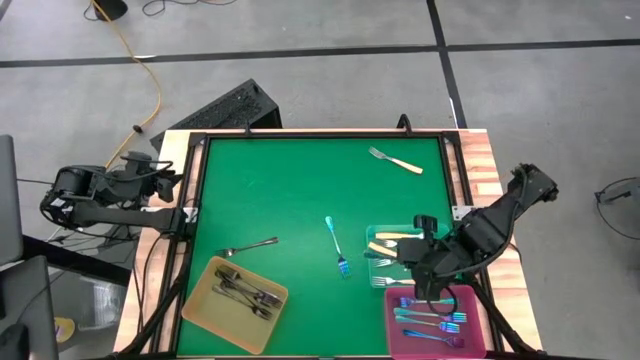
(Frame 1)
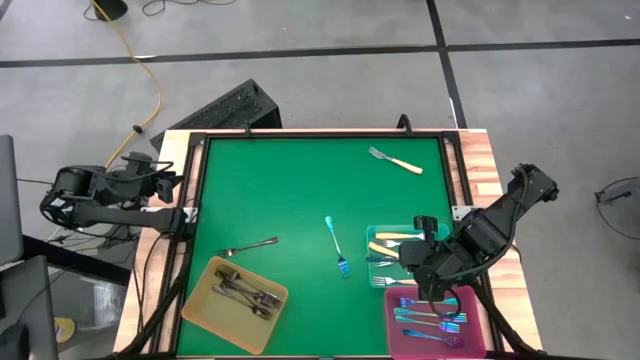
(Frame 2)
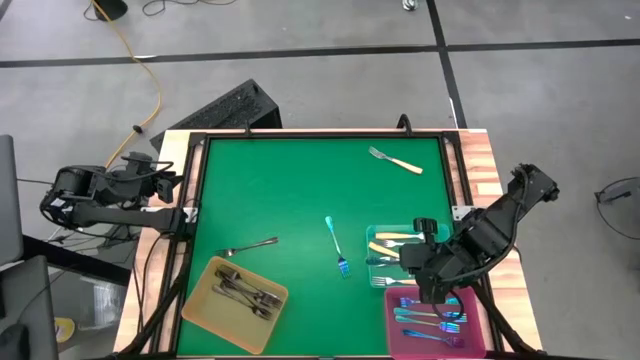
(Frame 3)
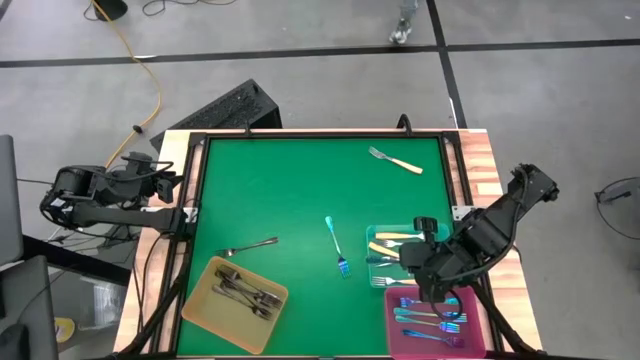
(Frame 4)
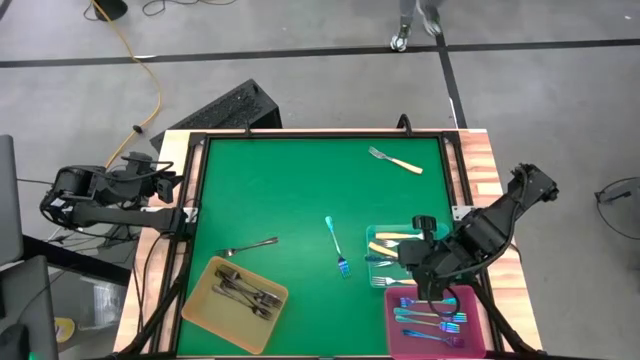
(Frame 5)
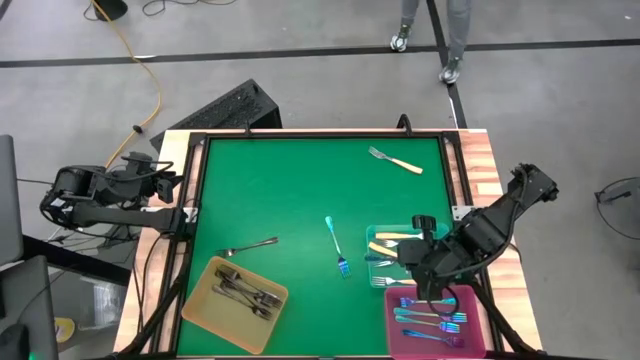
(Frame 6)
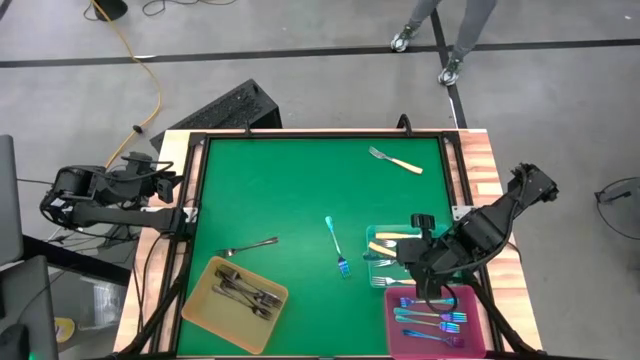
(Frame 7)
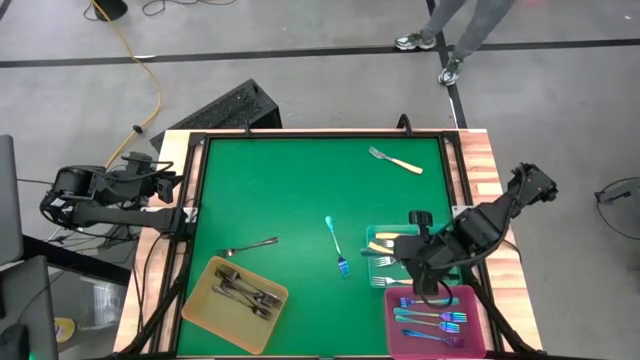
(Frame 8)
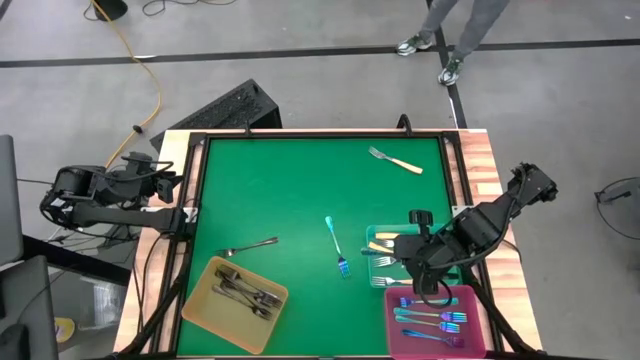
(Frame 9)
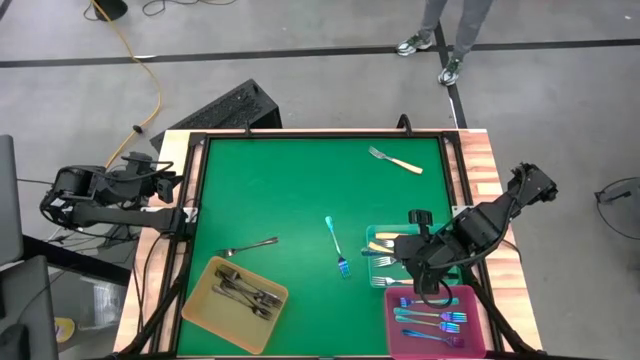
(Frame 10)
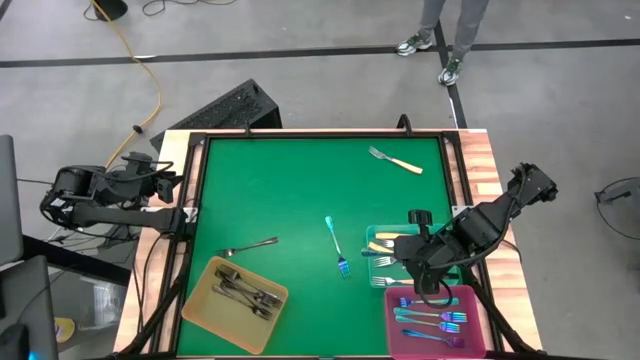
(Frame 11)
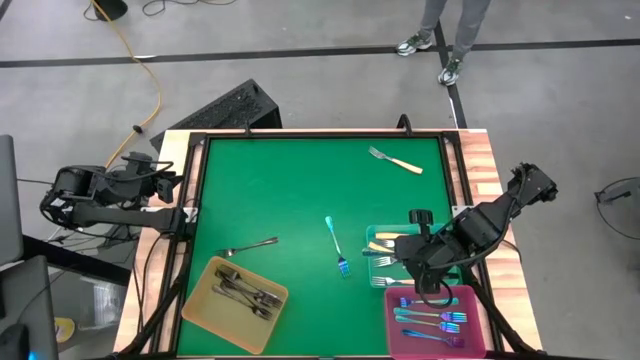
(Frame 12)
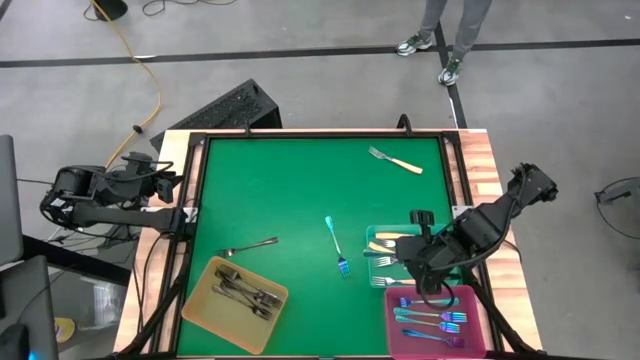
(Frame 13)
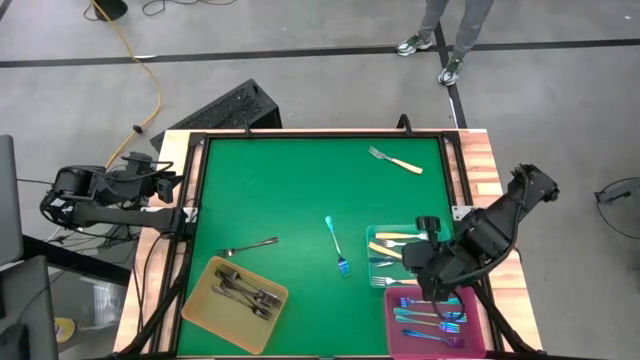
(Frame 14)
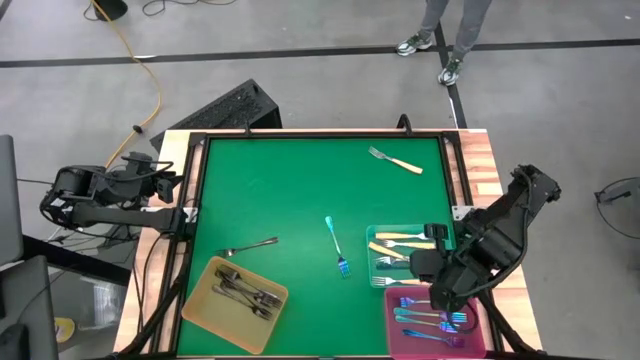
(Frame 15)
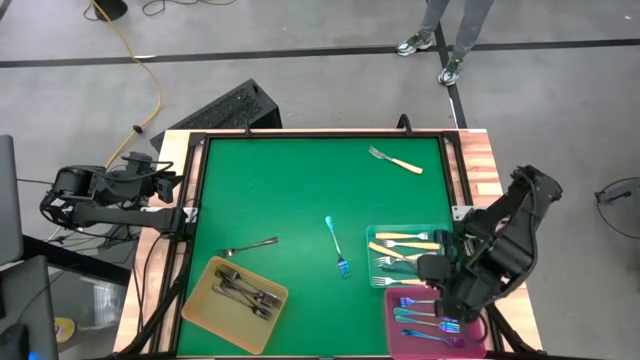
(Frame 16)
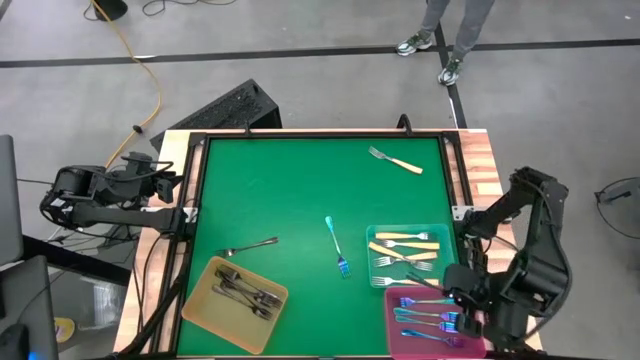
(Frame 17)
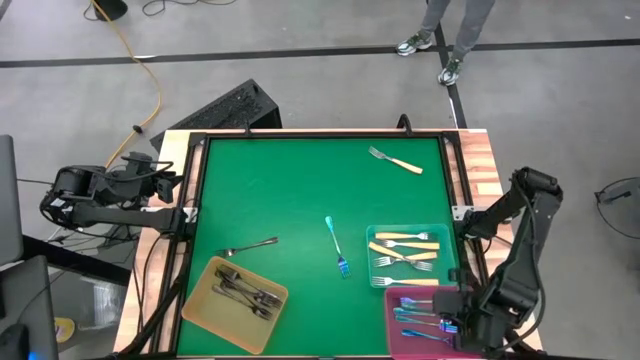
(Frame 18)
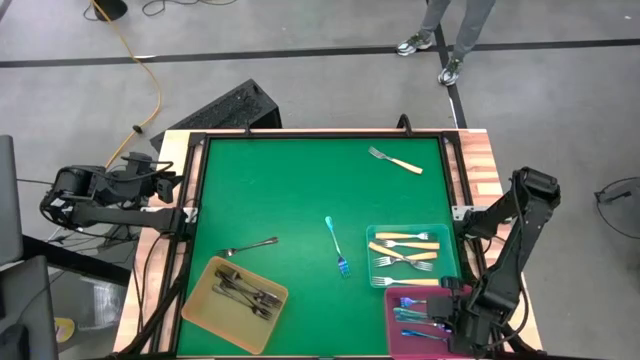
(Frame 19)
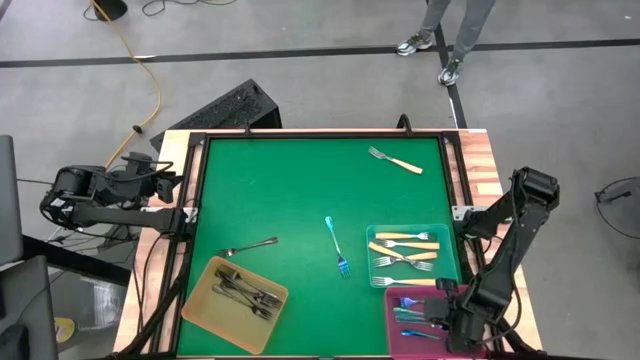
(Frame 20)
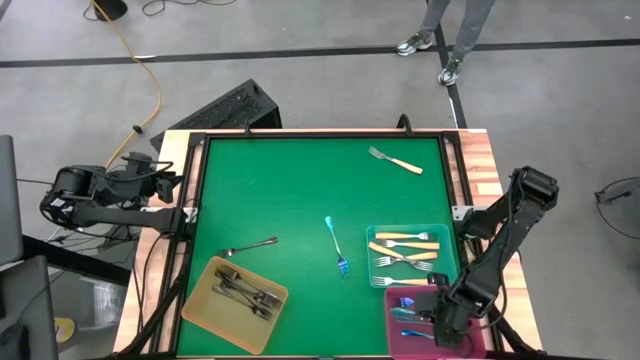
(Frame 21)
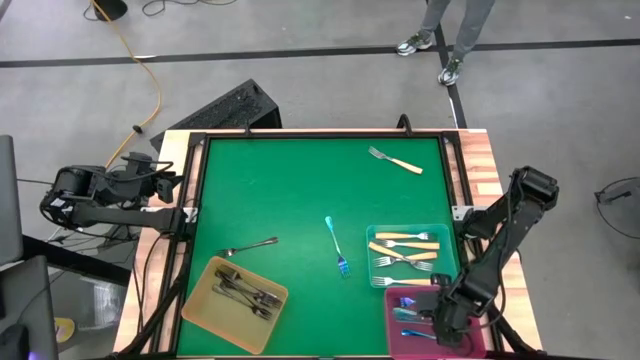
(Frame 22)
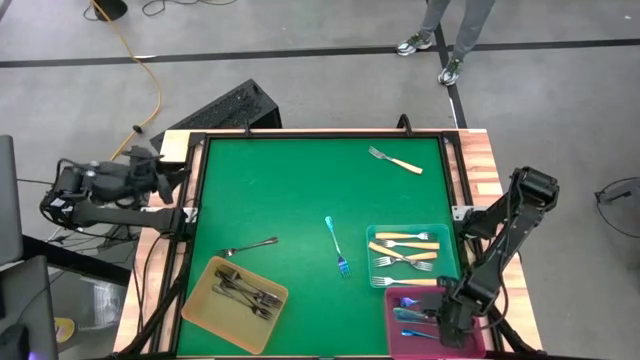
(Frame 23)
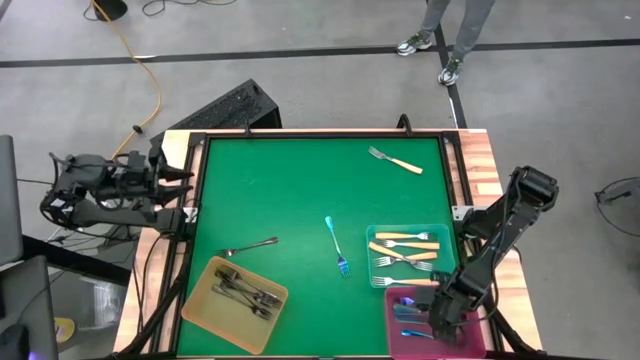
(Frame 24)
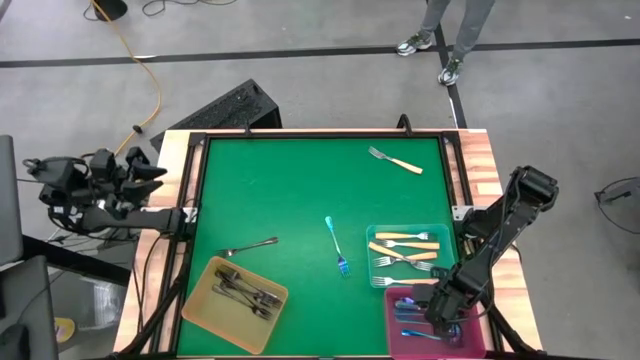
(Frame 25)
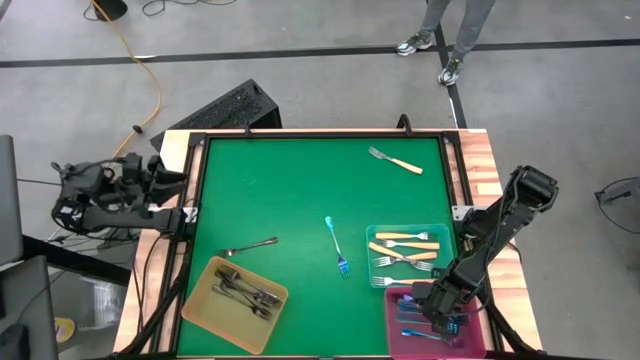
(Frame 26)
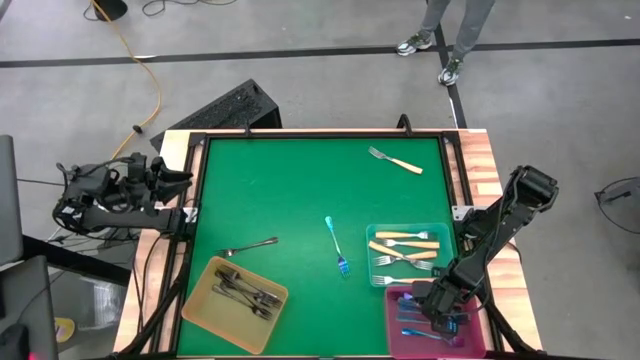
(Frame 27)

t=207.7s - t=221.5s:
Task: Sort silverware by color (type)
Put the purple fork into the pink bin

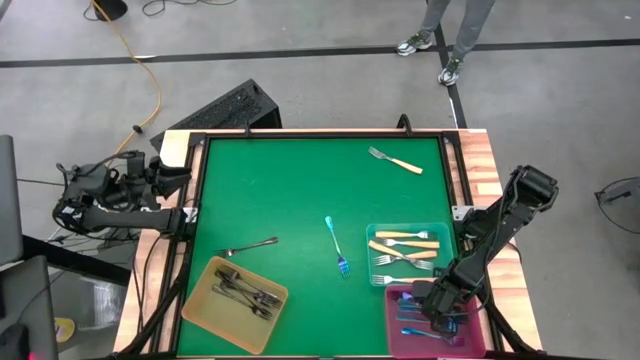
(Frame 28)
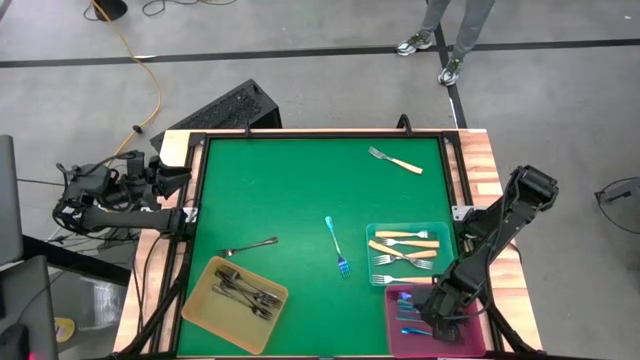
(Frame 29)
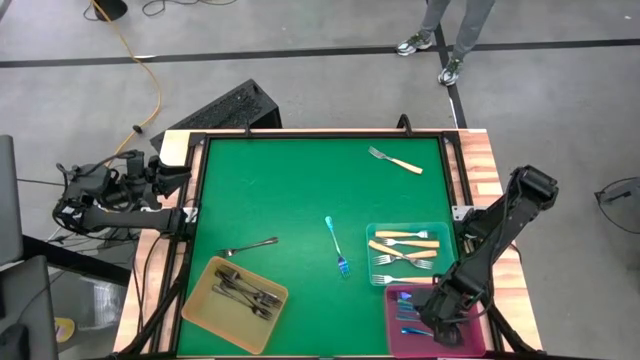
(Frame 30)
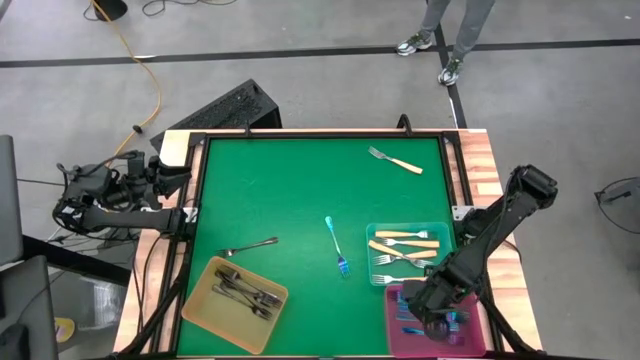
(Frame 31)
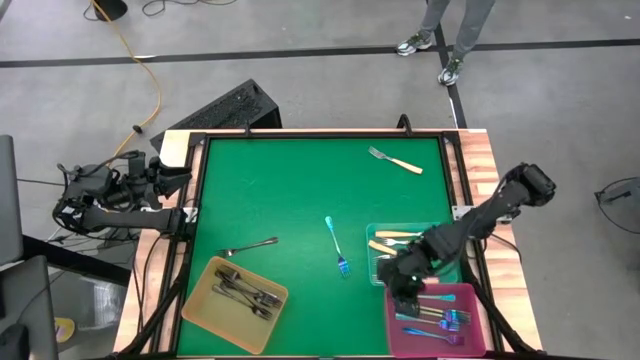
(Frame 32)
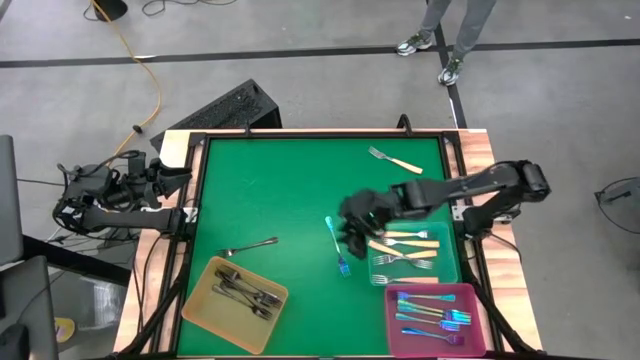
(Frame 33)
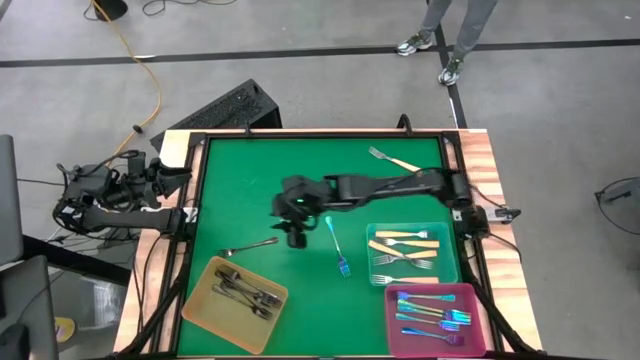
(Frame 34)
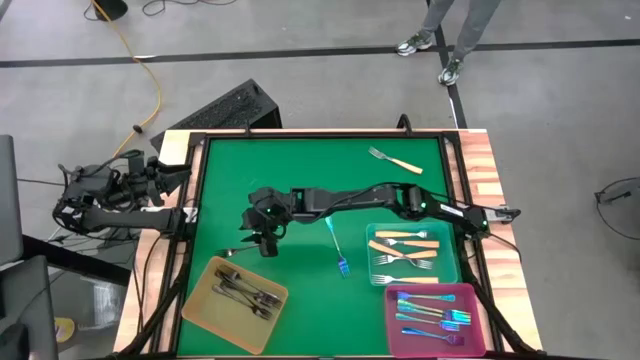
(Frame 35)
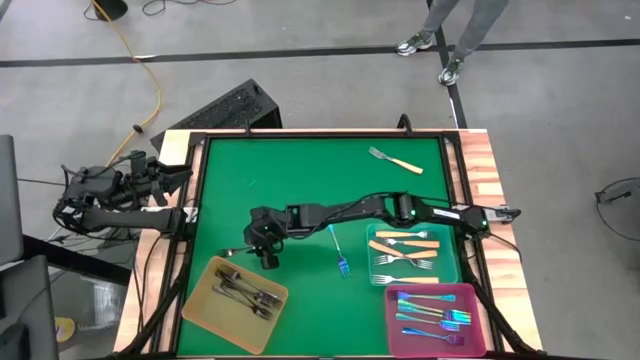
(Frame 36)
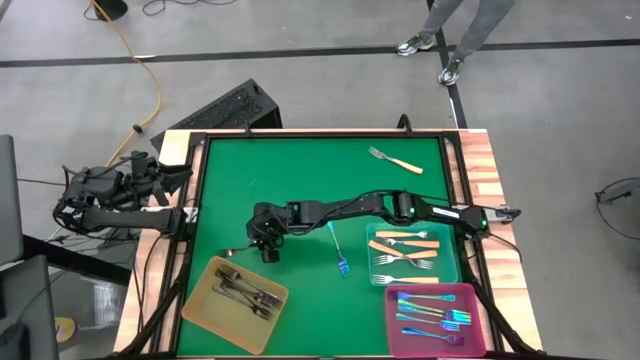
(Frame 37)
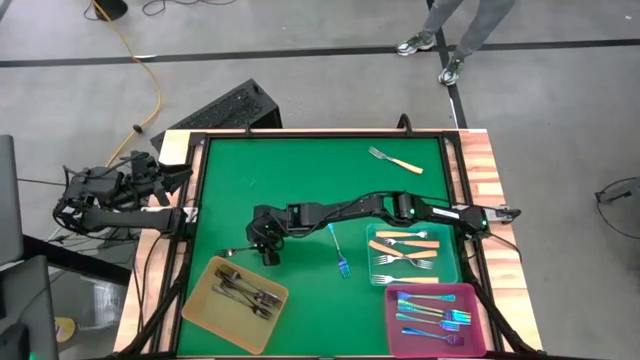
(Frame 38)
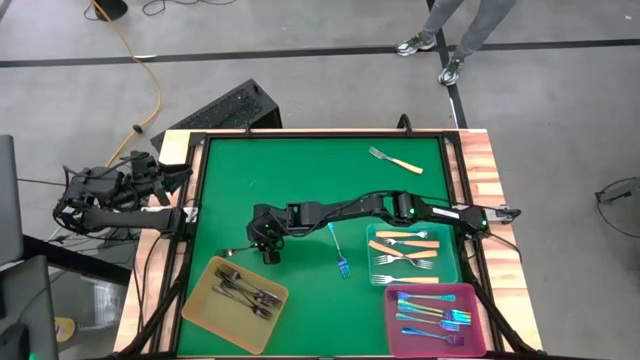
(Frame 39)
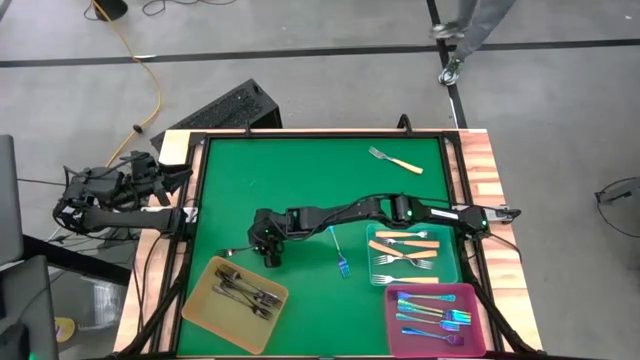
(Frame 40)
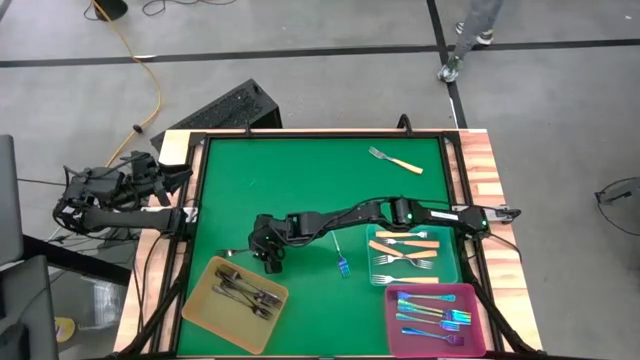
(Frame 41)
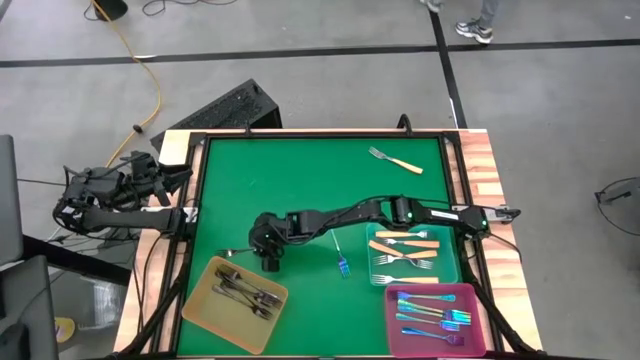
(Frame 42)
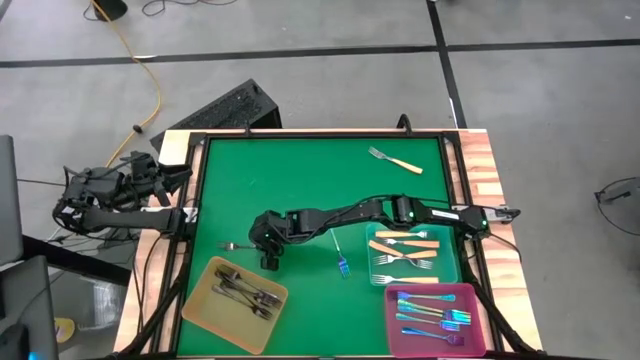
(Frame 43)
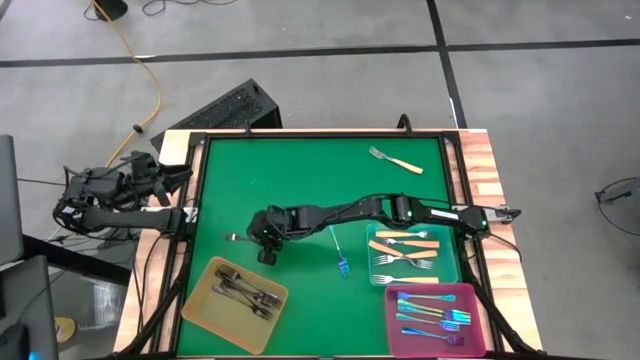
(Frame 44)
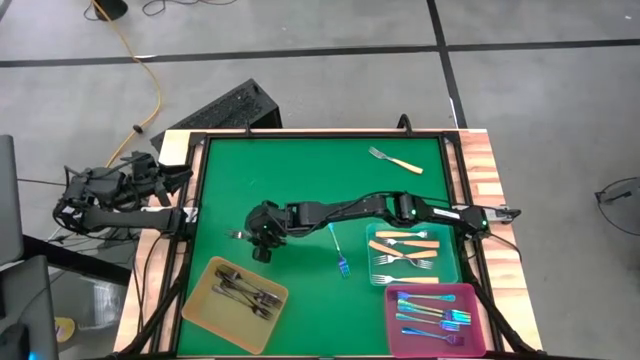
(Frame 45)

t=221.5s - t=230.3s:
Put the black fork into the orange bin
